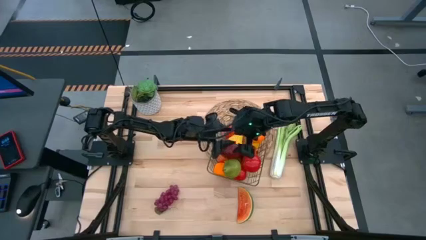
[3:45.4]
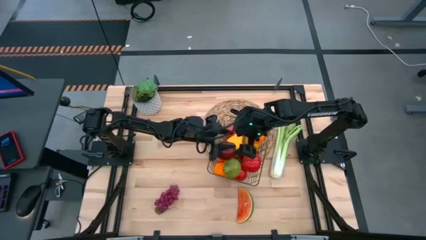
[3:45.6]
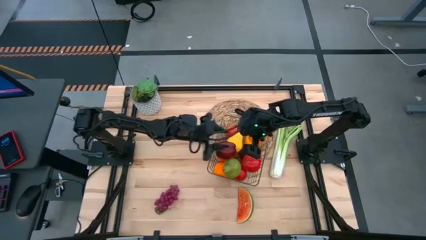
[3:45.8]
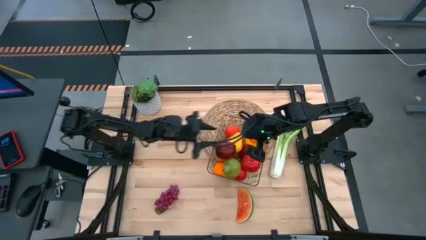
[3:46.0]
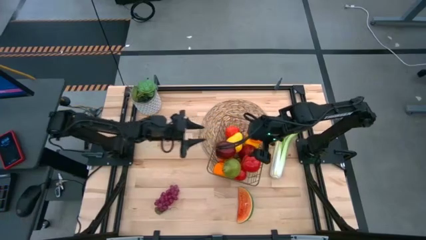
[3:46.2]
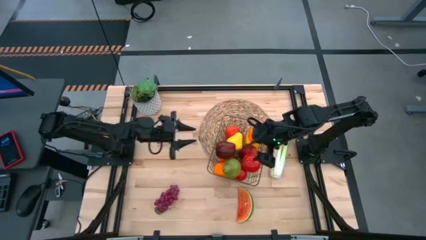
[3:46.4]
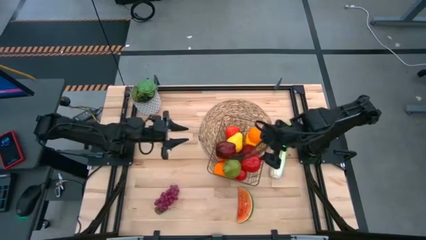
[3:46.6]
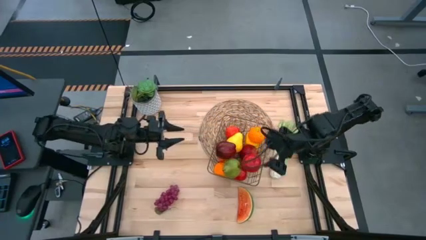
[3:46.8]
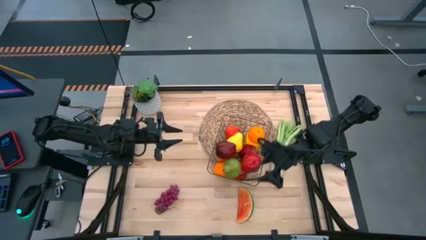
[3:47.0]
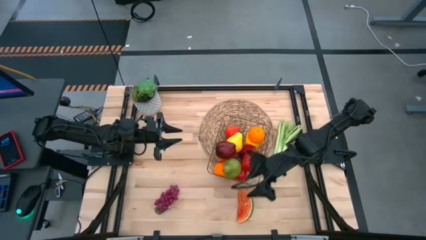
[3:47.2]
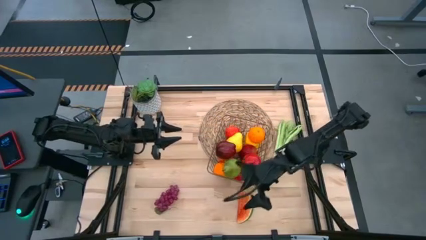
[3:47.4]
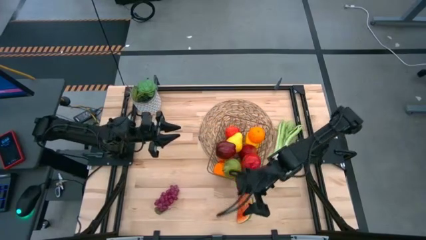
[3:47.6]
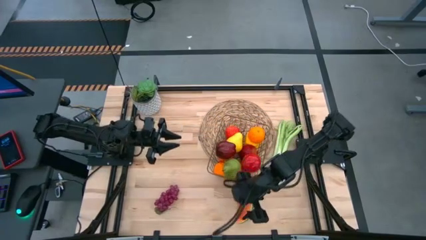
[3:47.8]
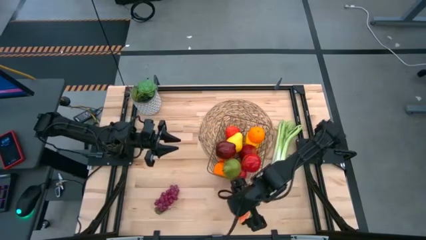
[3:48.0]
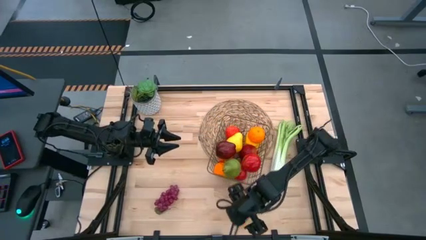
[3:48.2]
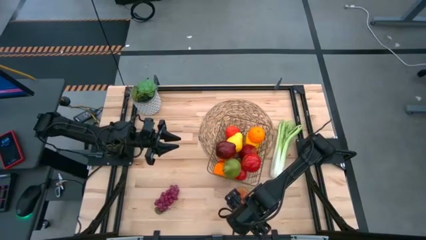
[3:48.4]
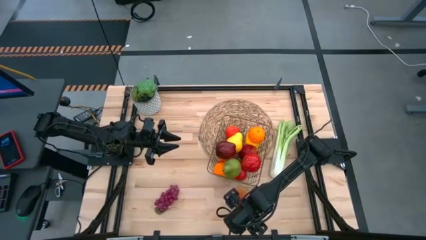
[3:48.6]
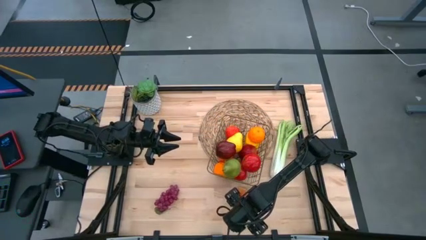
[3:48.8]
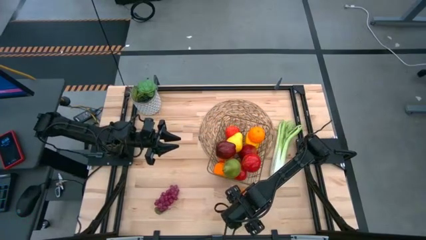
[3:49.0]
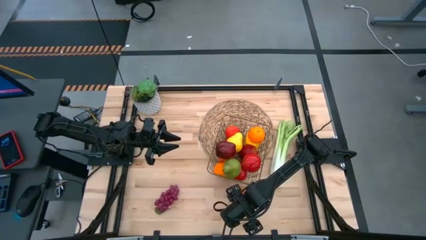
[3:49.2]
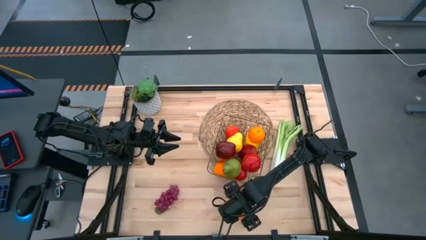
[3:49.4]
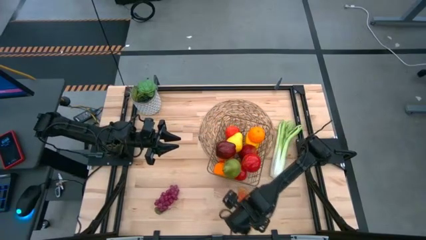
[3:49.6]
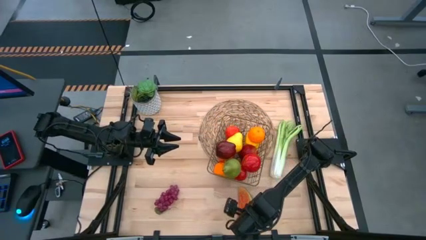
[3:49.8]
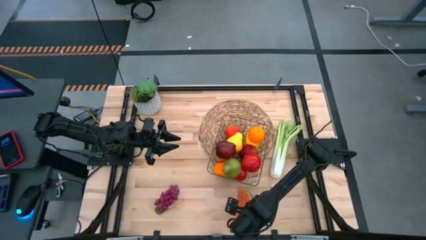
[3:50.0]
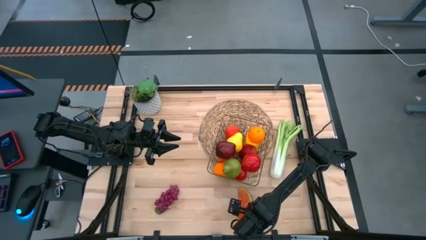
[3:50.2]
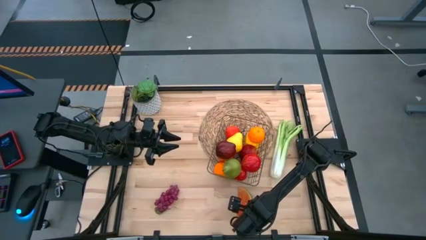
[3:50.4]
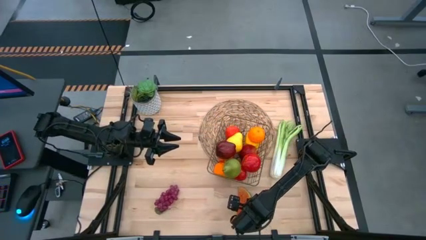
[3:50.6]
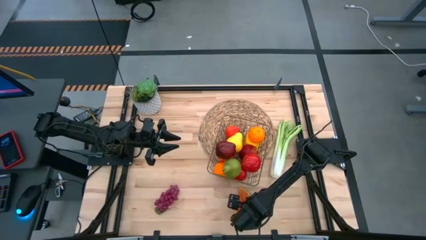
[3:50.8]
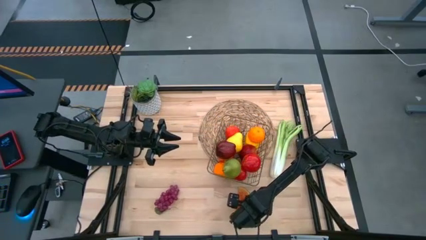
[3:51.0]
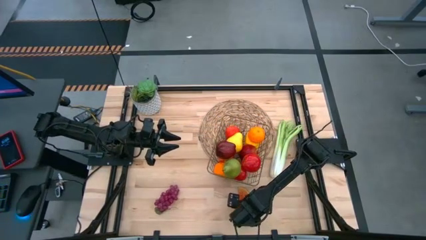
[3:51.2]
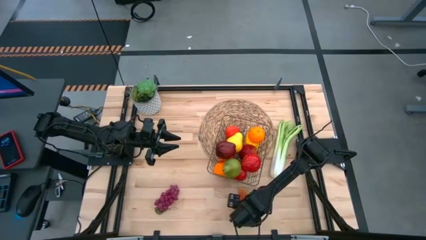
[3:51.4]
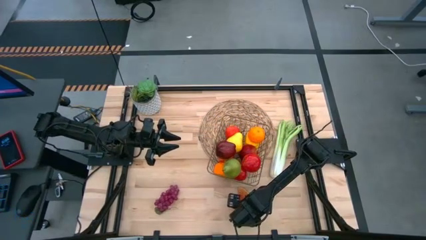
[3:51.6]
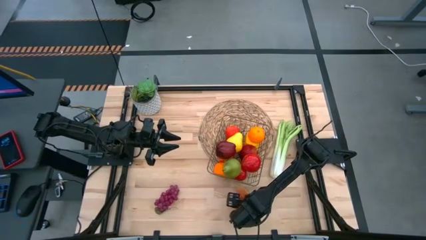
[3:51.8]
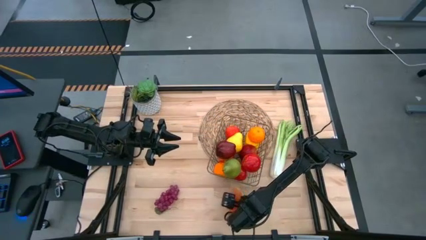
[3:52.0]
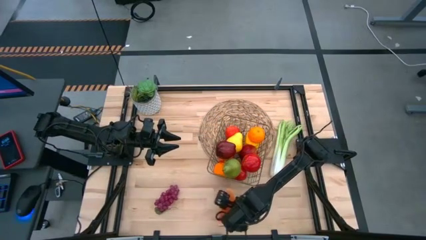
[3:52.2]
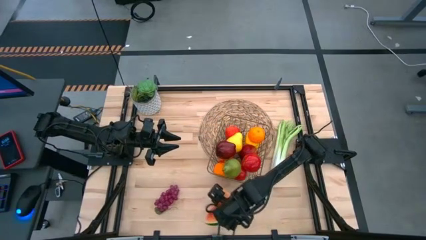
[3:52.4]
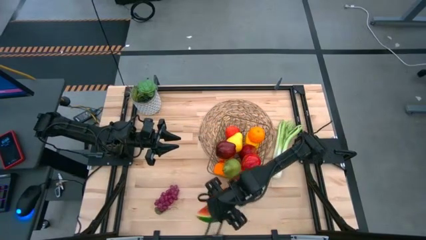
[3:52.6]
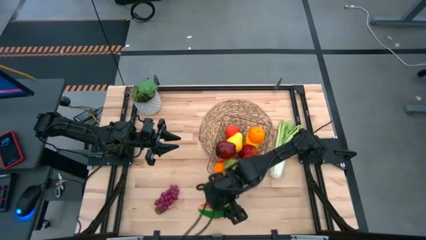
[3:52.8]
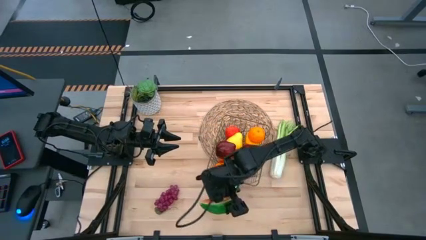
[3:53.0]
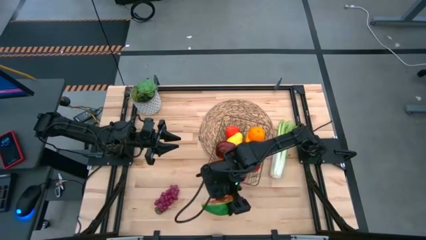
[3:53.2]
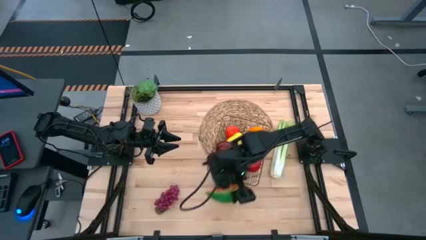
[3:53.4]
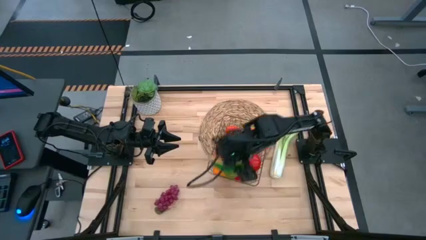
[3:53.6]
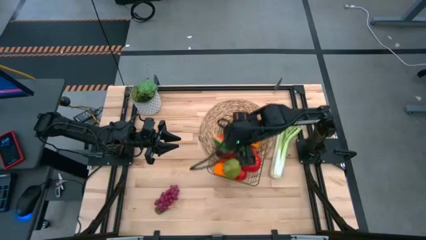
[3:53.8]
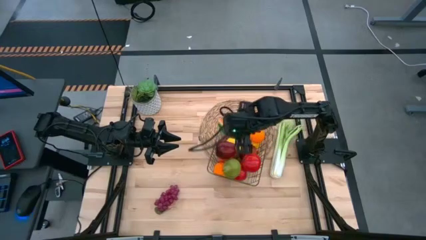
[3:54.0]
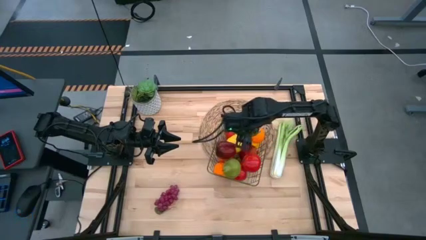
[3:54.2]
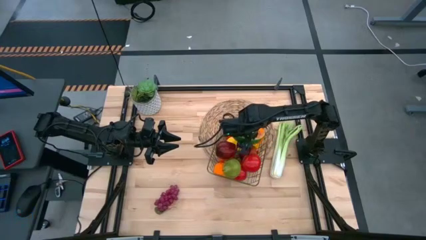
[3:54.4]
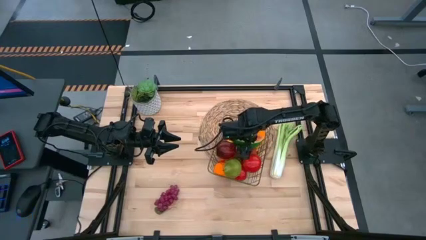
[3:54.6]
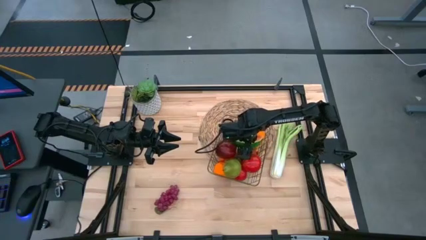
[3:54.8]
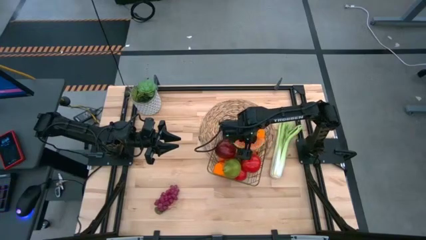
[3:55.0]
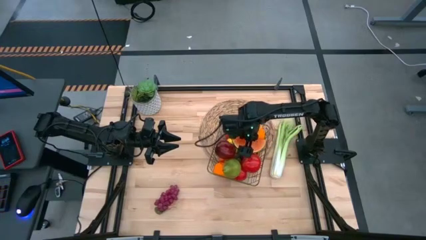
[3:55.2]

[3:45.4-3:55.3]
Task: Build produce basket
Put the watermelon into the wire basket

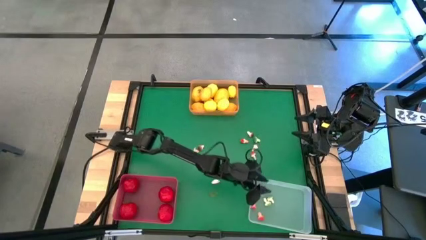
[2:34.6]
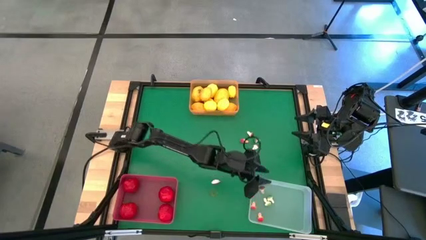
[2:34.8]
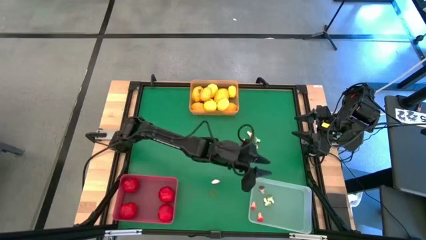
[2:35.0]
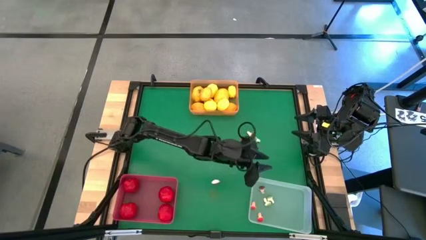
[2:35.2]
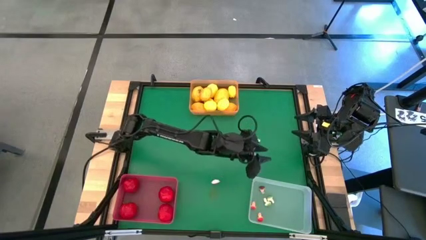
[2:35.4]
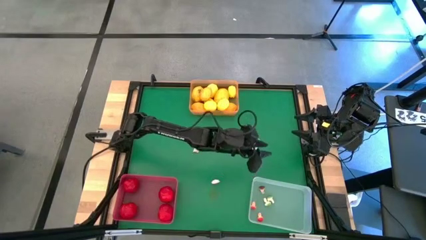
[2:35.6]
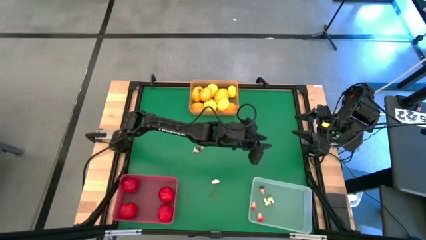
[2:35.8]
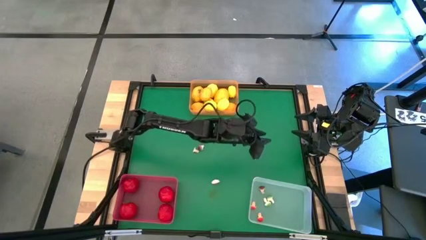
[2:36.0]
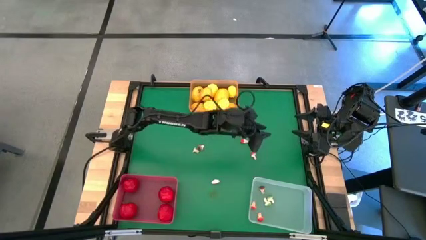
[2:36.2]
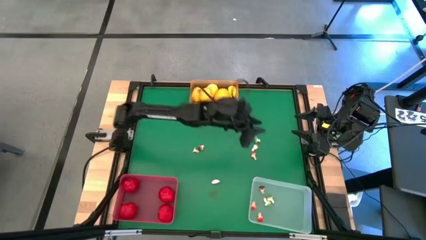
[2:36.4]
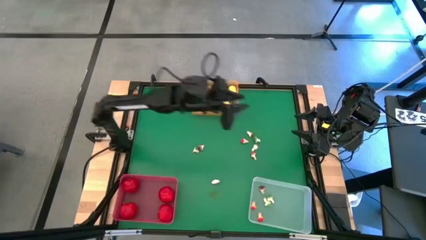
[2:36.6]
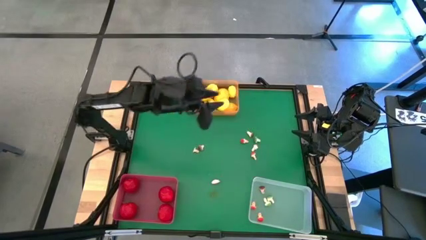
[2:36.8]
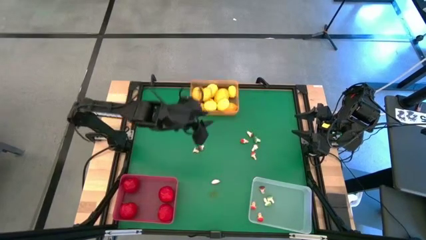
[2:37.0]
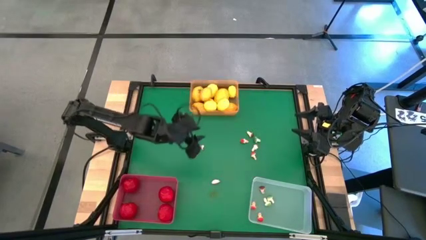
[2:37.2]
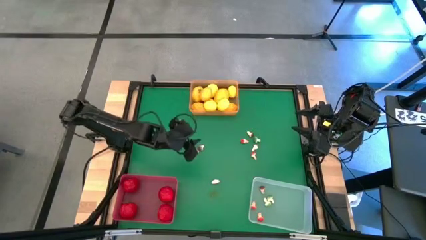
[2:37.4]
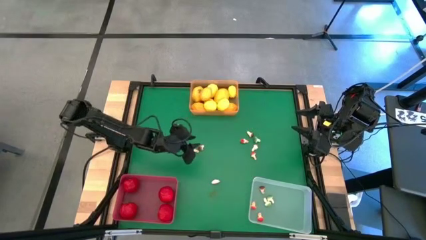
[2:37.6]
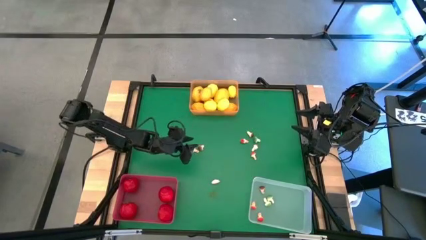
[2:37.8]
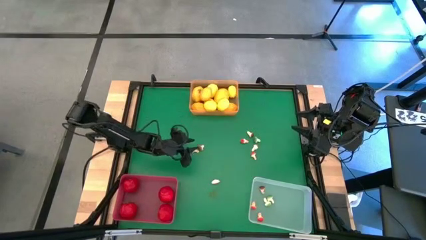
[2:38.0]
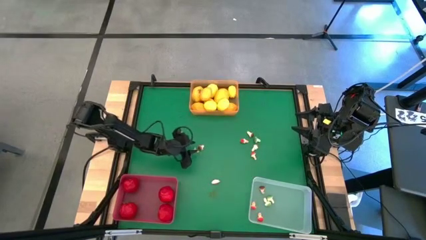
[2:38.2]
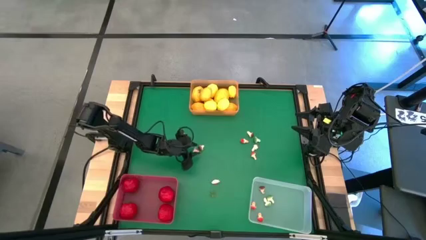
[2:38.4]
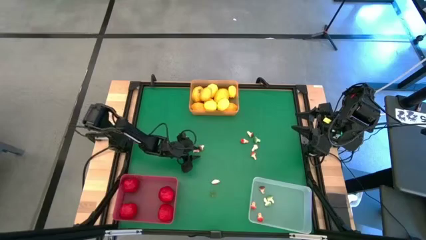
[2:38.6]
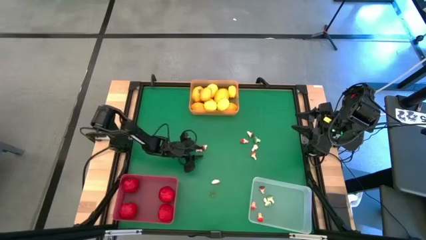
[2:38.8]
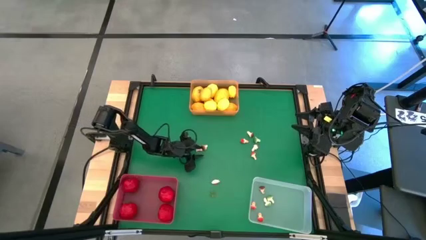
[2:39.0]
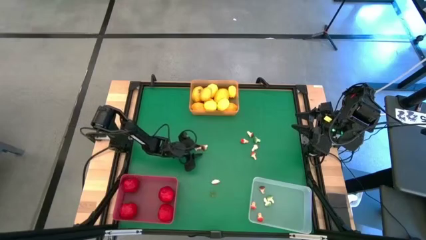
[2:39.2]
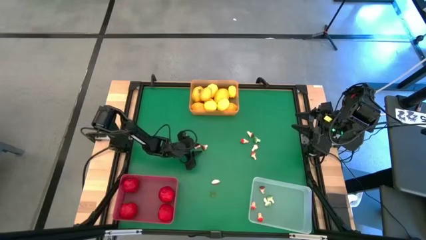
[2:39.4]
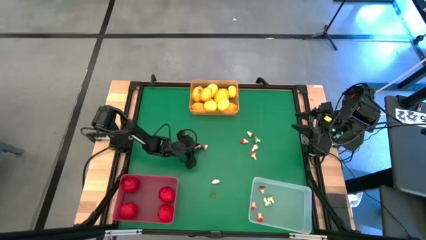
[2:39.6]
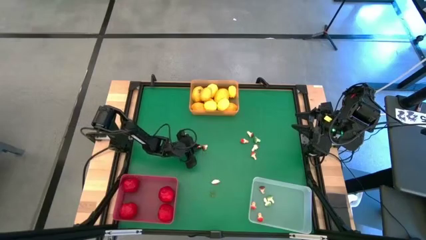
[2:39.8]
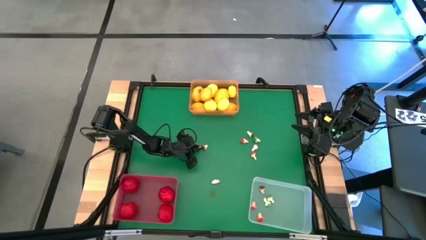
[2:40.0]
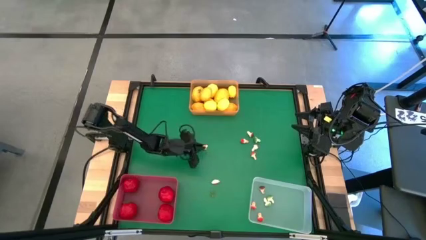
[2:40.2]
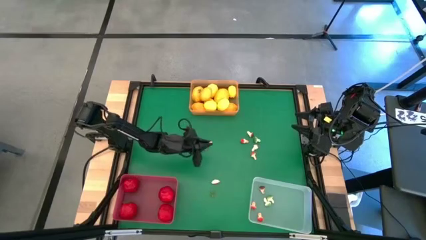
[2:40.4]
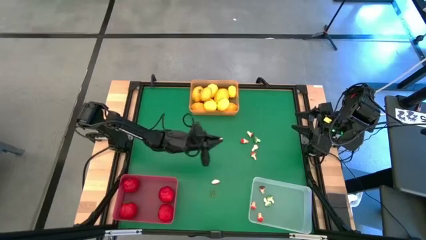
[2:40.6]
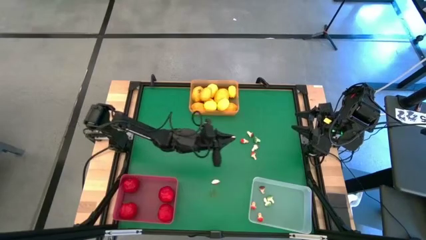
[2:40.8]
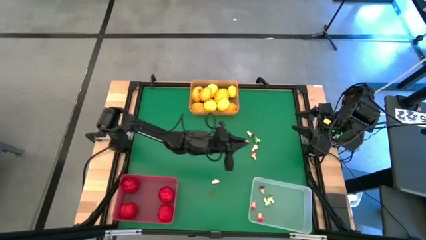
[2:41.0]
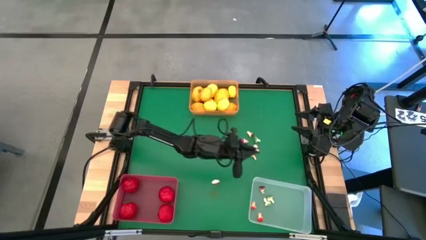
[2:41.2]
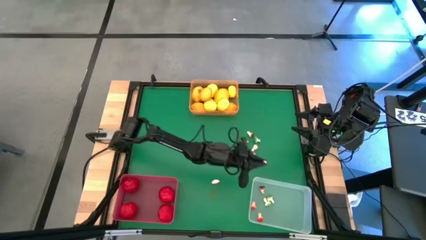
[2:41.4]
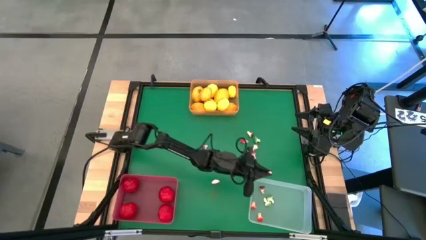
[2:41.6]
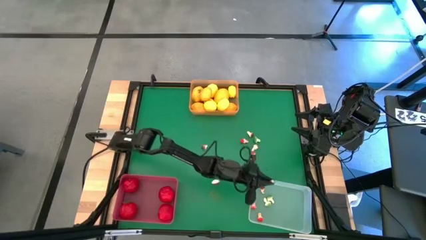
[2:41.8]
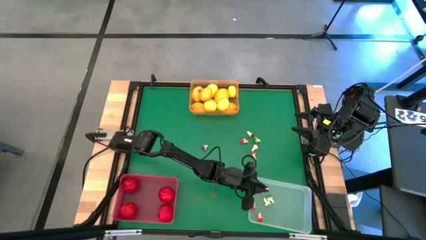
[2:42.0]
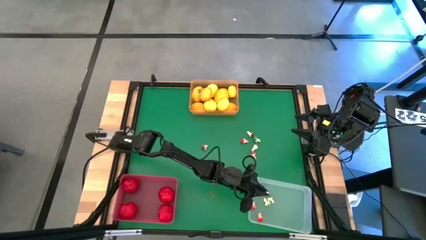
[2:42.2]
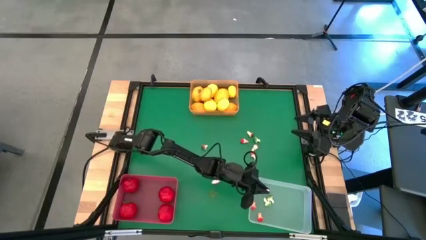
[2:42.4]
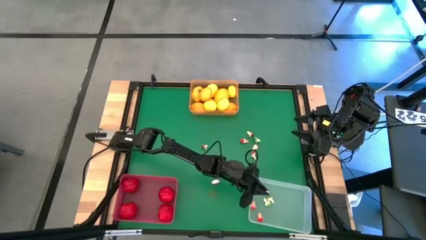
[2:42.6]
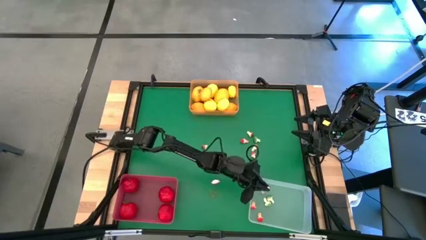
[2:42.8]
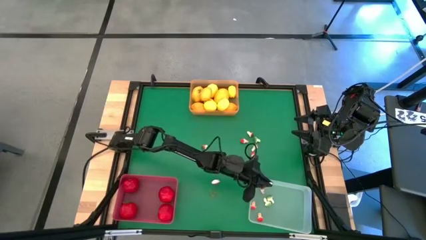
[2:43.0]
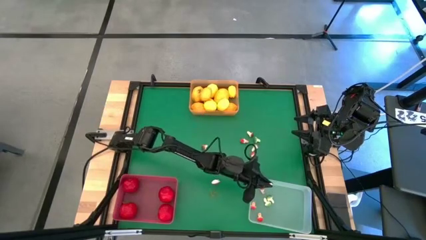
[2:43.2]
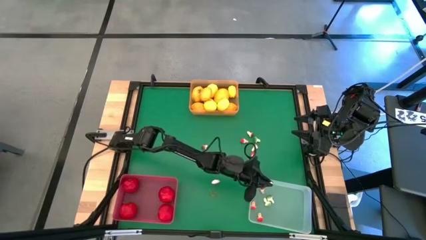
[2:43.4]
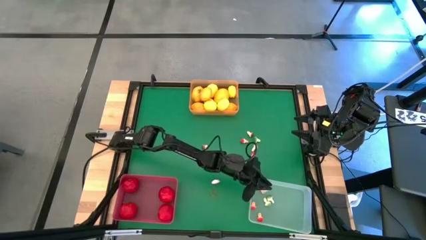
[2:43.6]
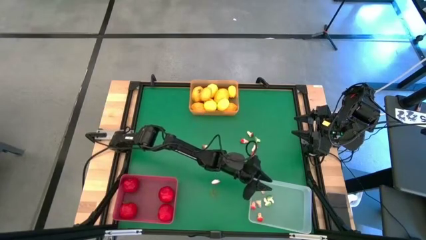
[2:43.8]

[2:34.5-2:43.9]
Task: Sort produce into baskets
Put the brown mushroom into the transparent bin
